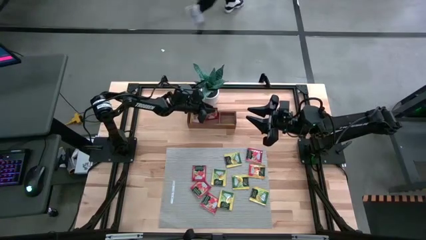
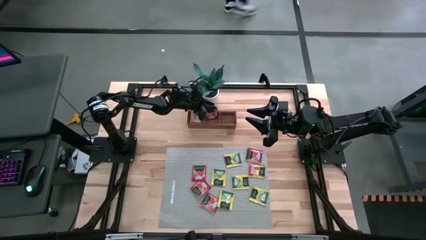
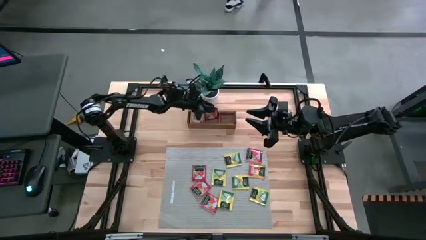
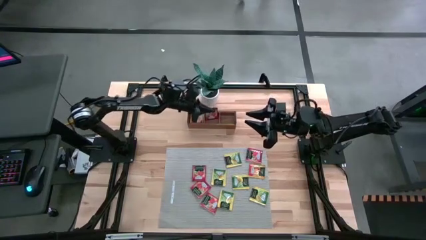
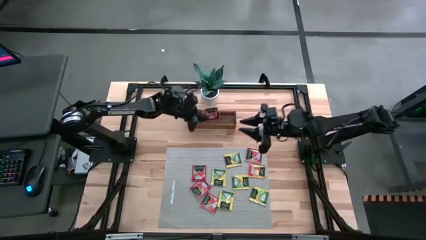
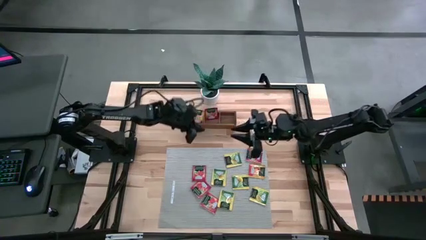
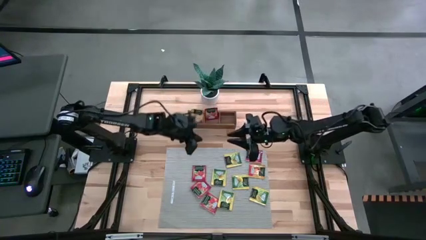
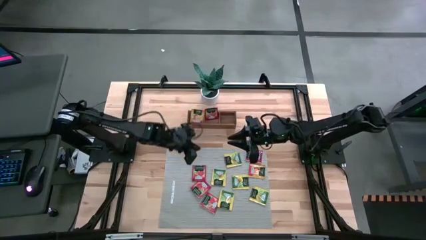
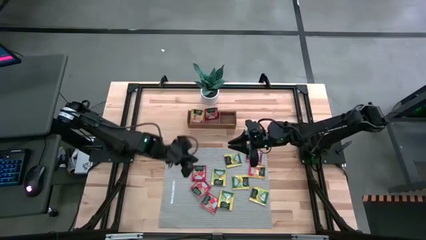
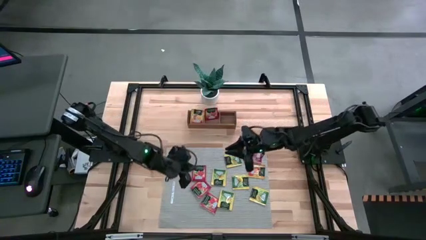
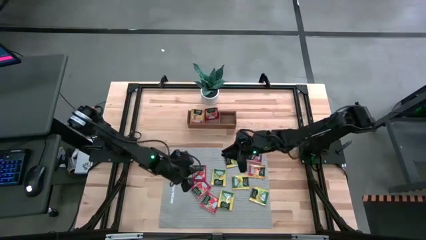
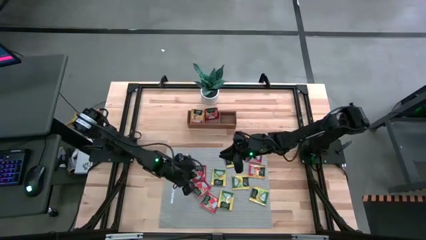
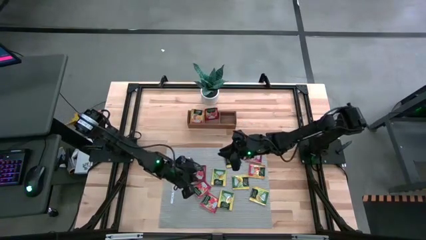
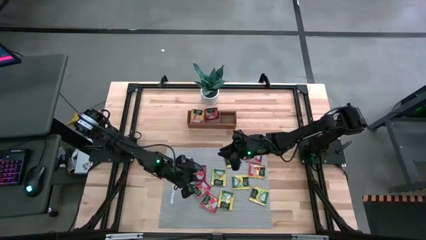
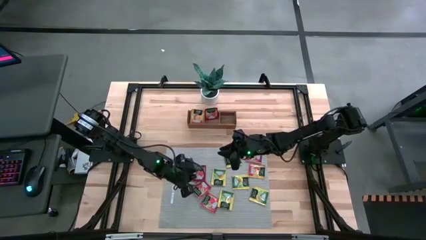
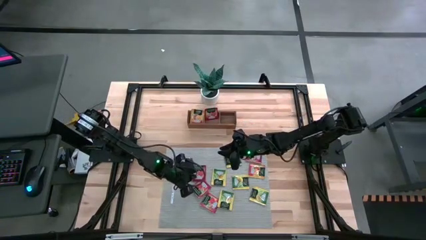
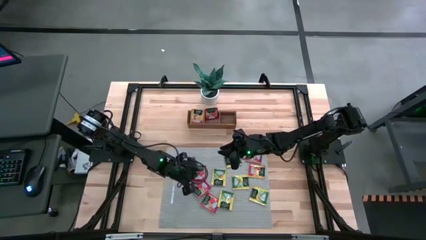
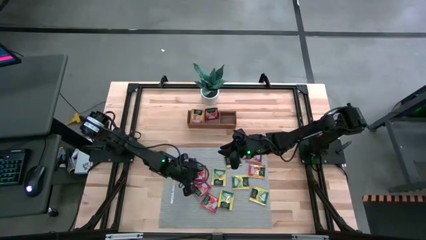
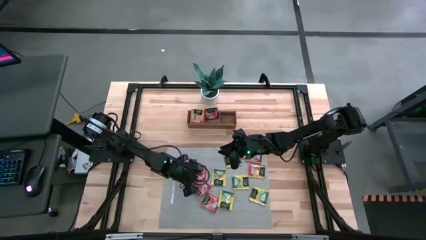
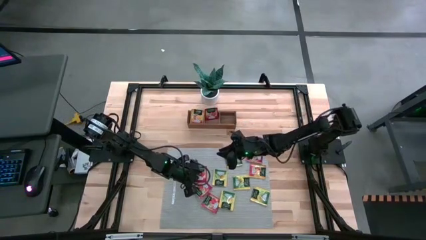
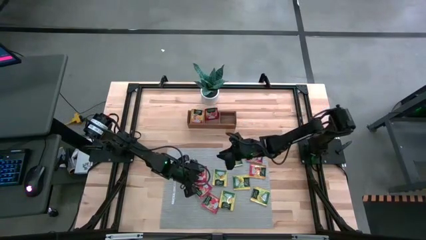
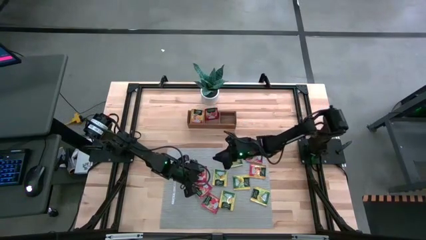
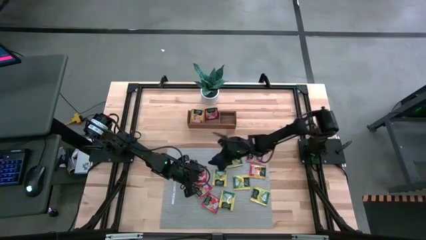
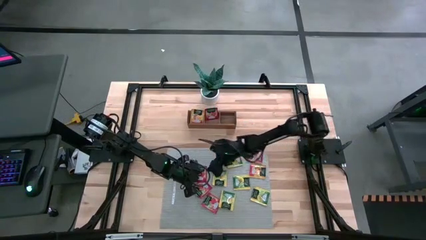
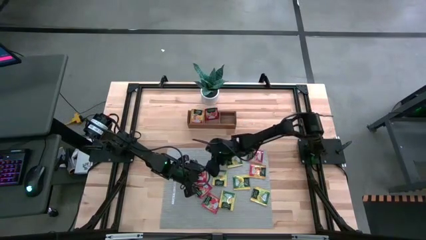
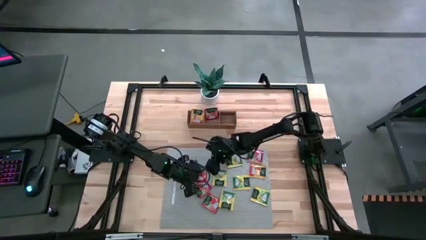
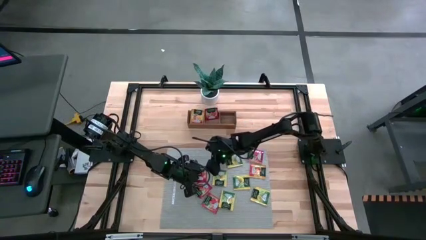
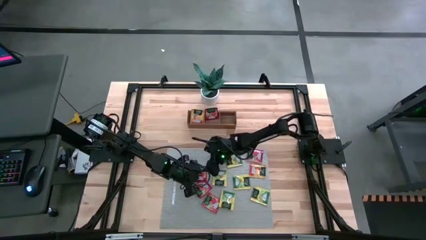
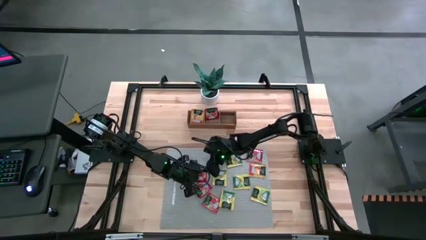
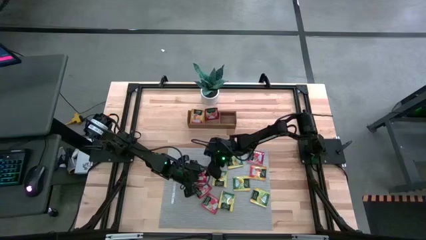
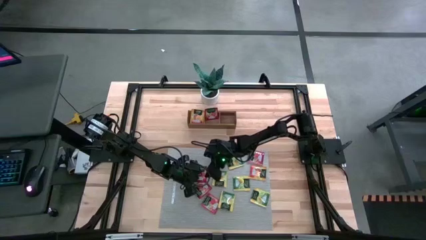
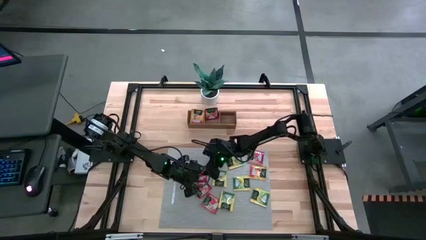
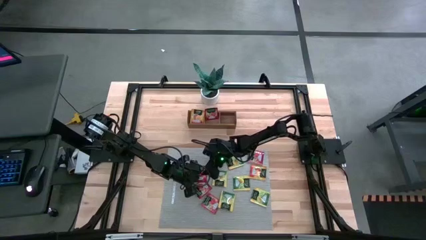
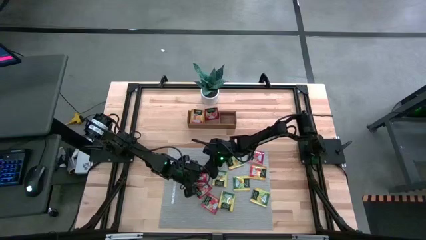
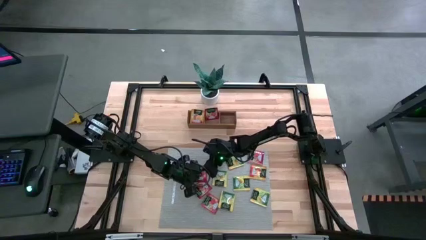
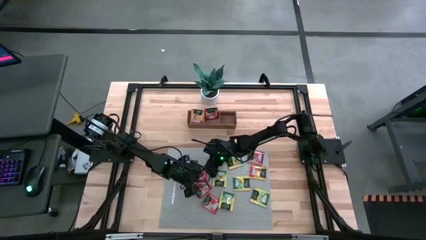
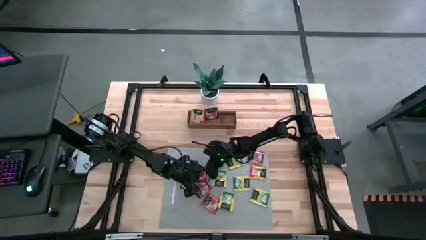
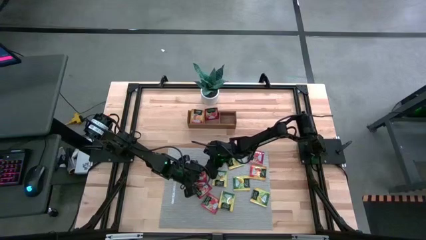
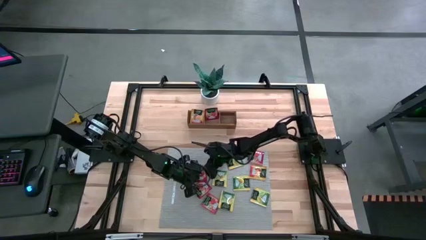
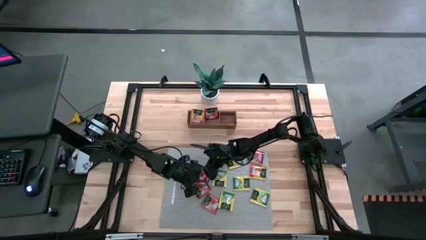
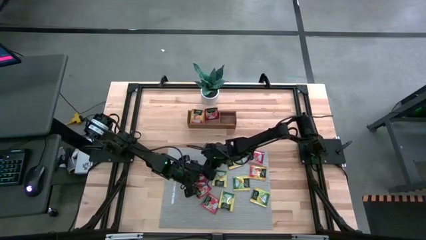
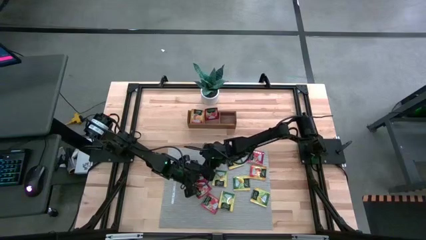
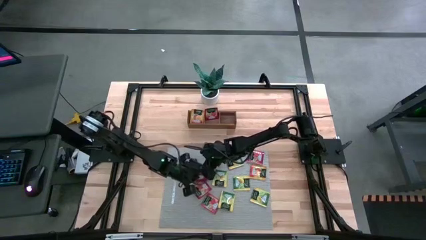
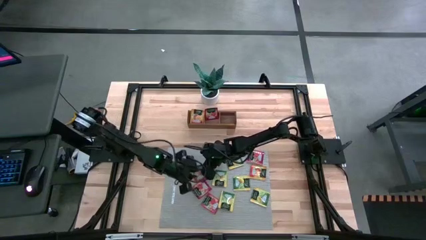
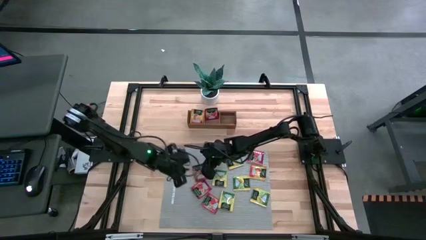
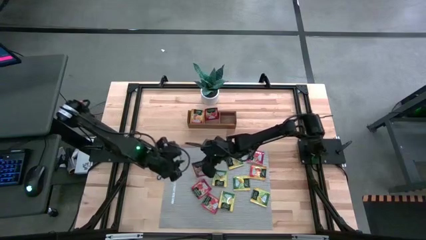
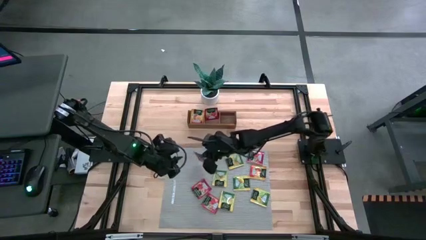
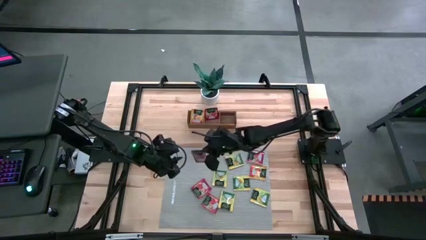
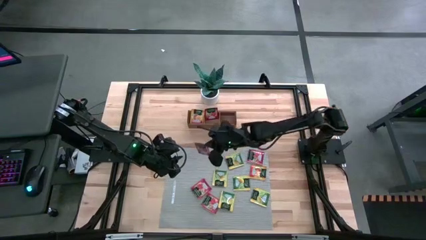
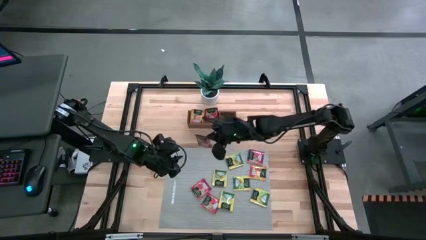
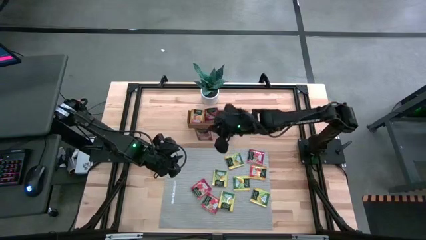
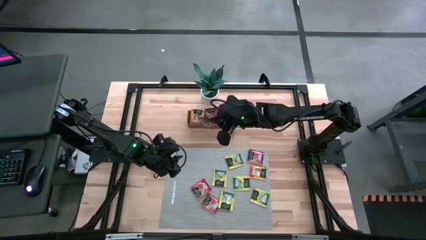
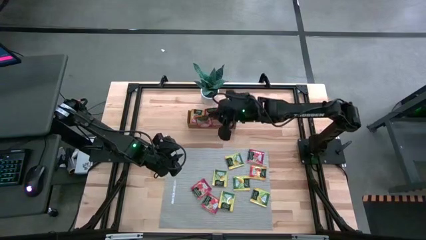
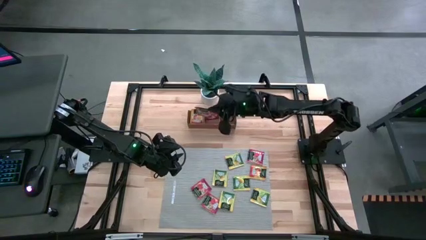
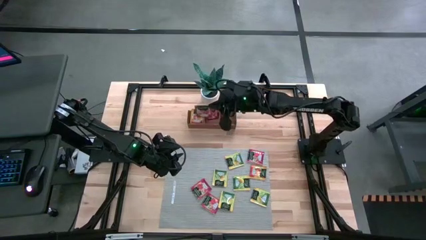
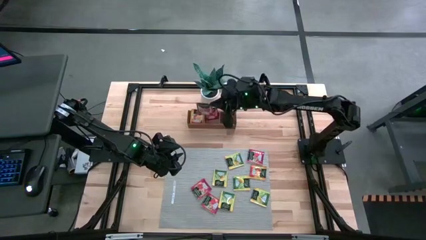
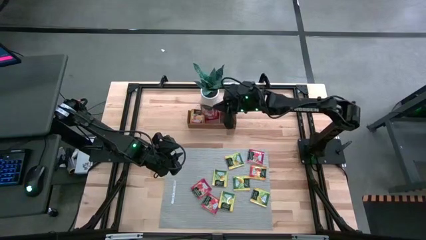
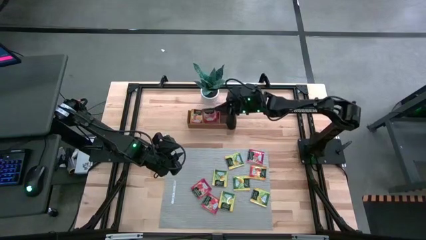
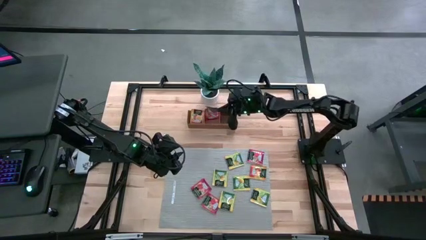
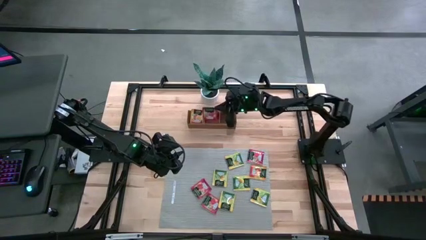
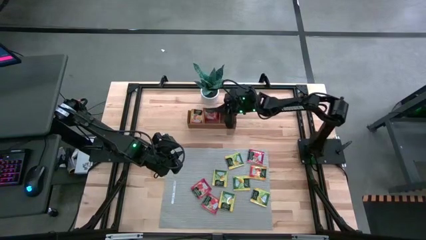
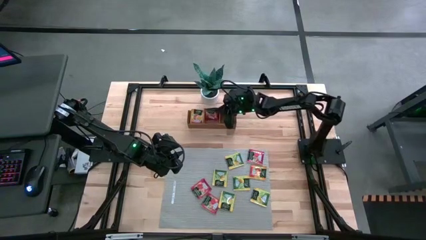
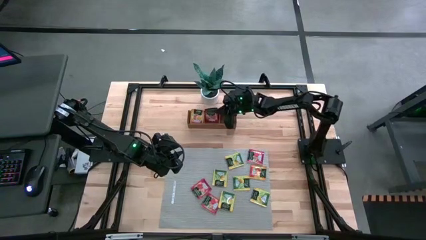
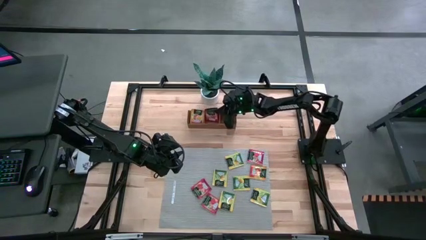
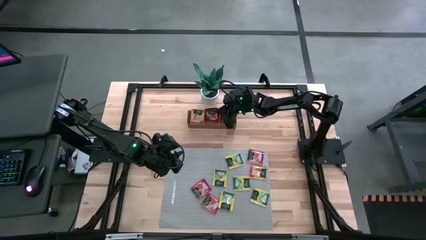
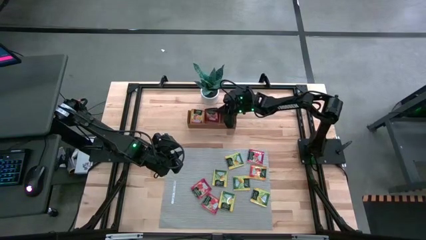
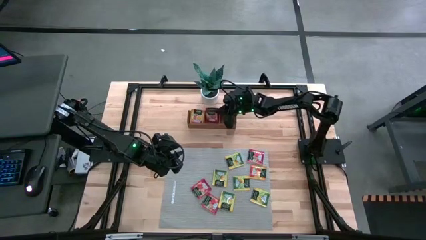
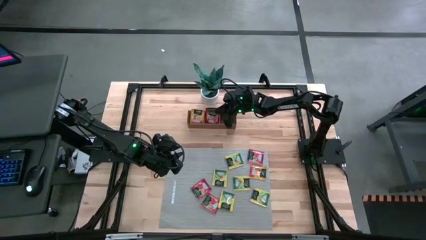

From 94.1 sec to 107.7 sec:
Task: Pick & Place Tea
Put the red tea bag into the middle section of the wooden organizer
